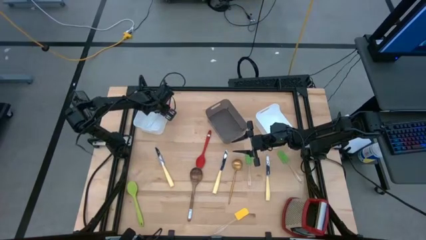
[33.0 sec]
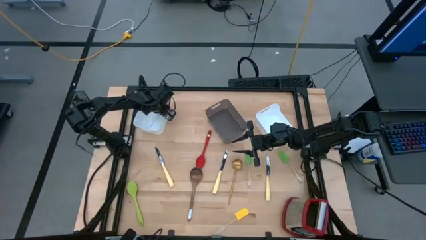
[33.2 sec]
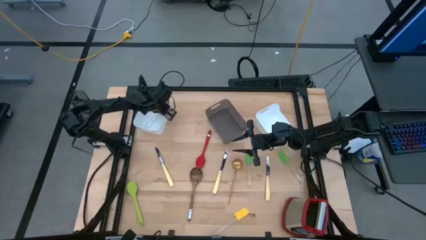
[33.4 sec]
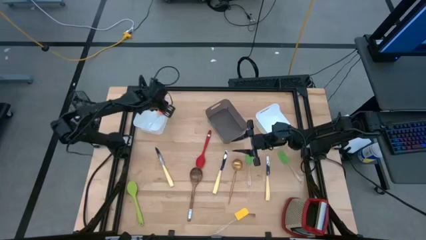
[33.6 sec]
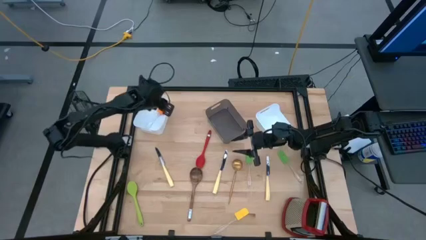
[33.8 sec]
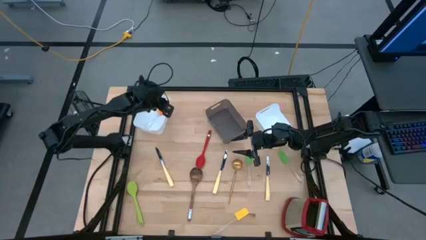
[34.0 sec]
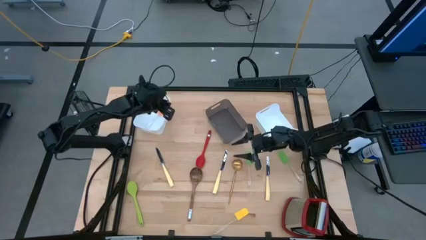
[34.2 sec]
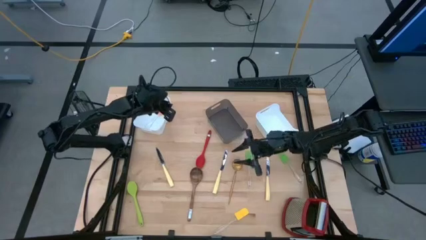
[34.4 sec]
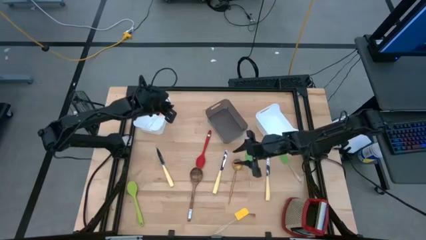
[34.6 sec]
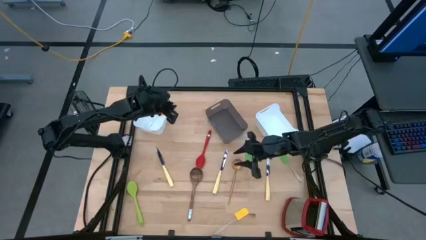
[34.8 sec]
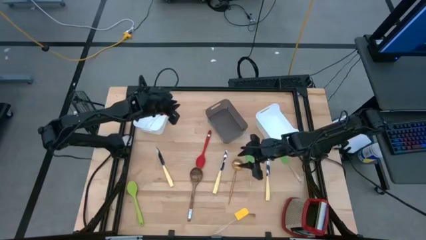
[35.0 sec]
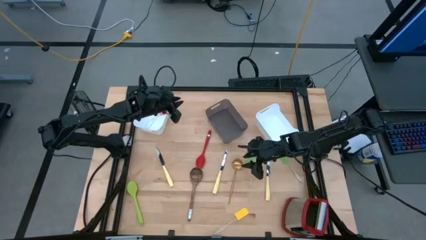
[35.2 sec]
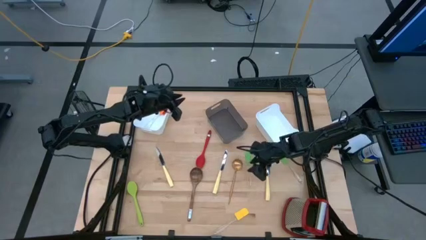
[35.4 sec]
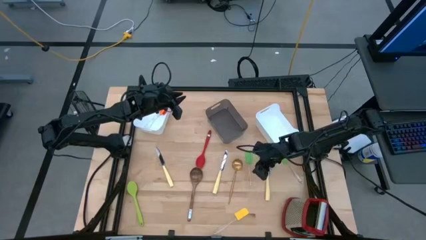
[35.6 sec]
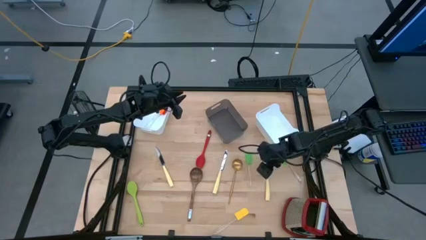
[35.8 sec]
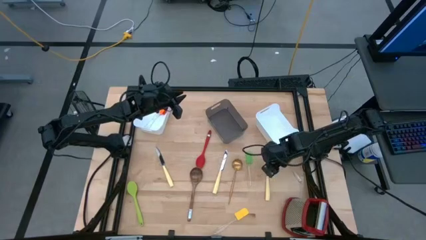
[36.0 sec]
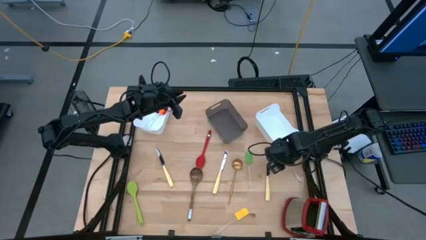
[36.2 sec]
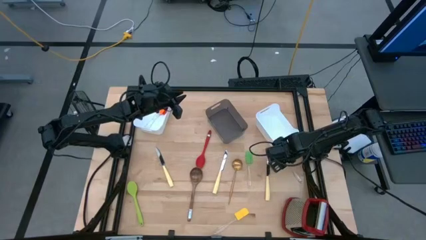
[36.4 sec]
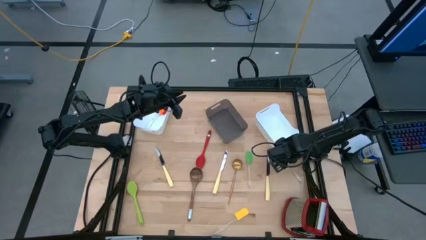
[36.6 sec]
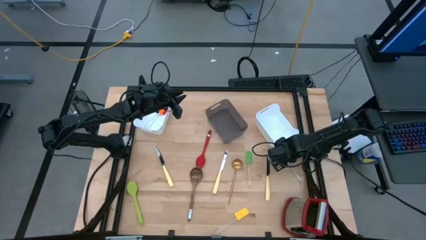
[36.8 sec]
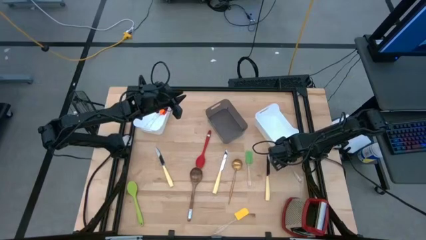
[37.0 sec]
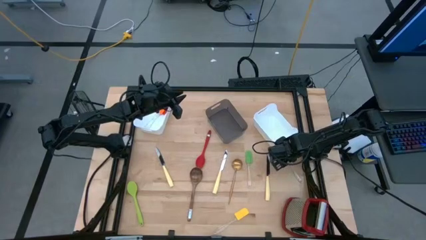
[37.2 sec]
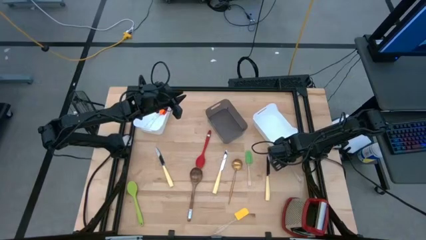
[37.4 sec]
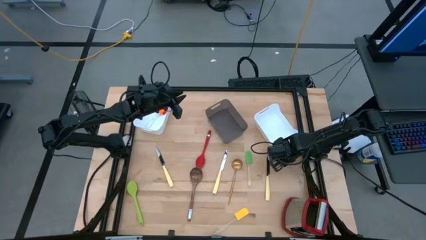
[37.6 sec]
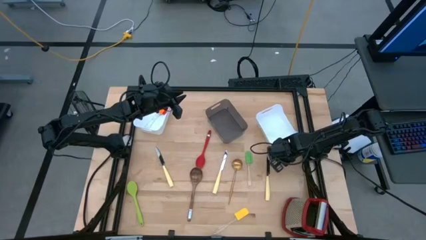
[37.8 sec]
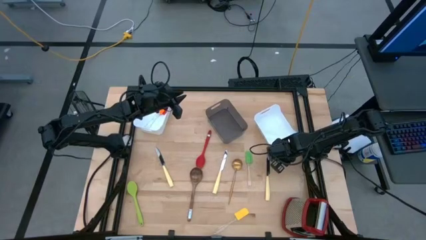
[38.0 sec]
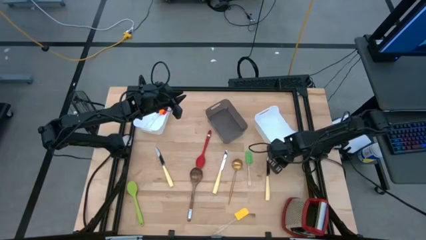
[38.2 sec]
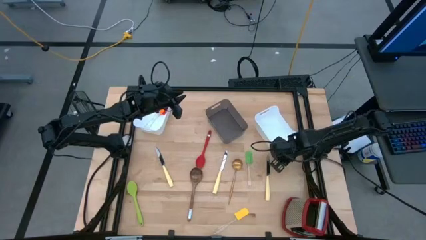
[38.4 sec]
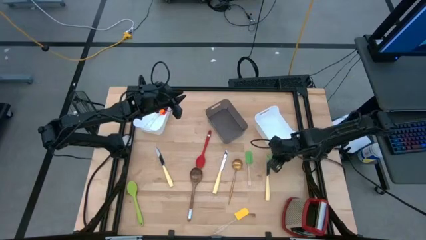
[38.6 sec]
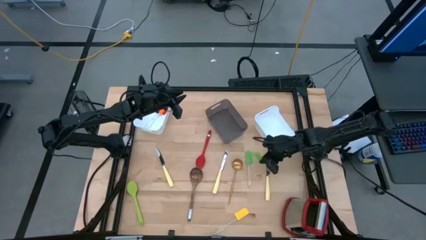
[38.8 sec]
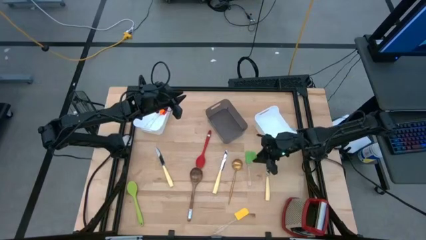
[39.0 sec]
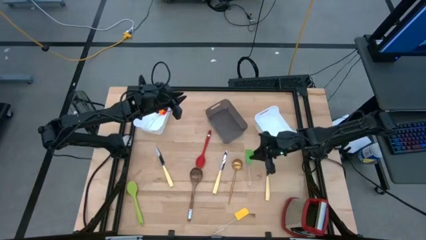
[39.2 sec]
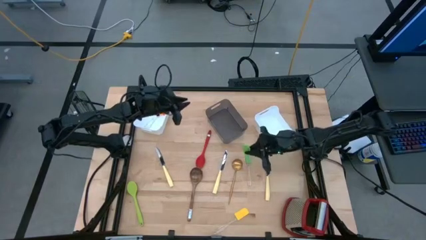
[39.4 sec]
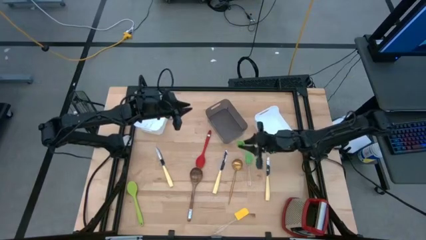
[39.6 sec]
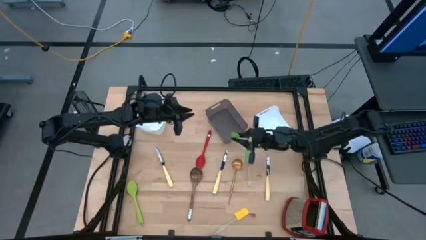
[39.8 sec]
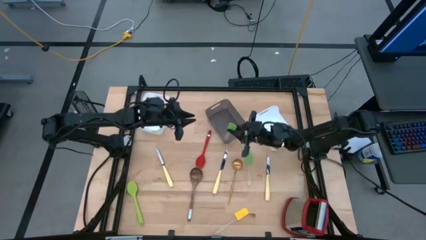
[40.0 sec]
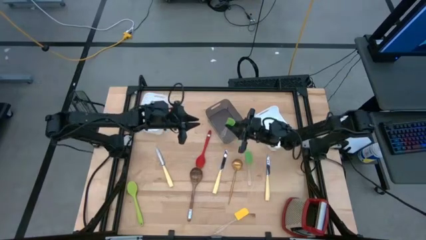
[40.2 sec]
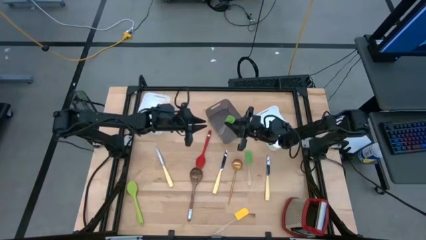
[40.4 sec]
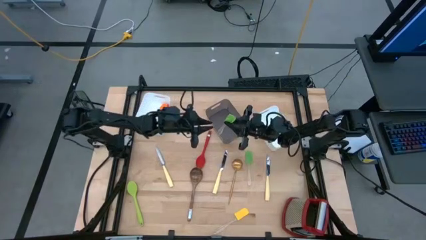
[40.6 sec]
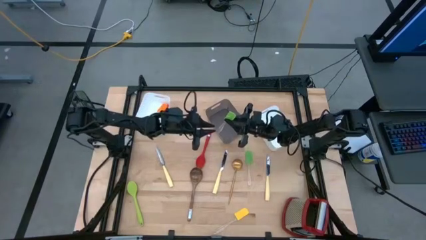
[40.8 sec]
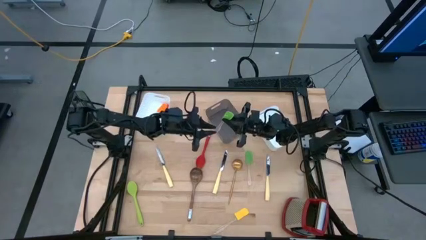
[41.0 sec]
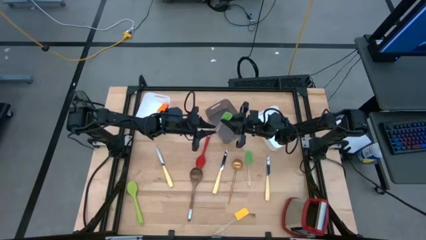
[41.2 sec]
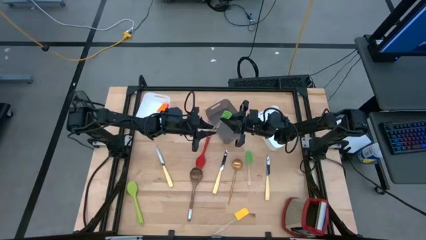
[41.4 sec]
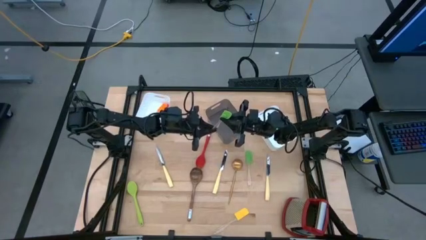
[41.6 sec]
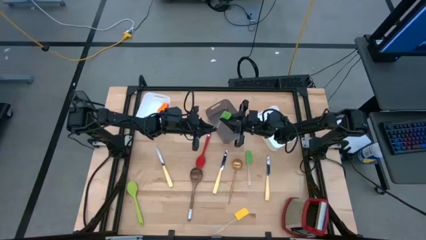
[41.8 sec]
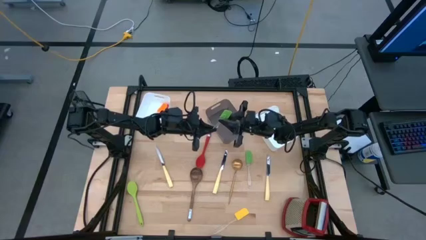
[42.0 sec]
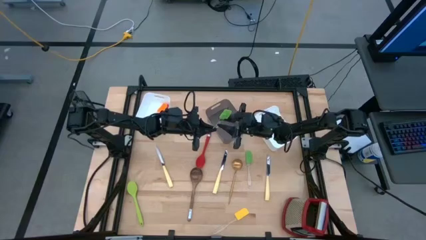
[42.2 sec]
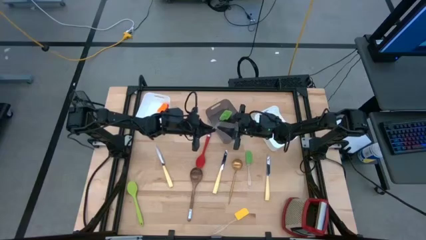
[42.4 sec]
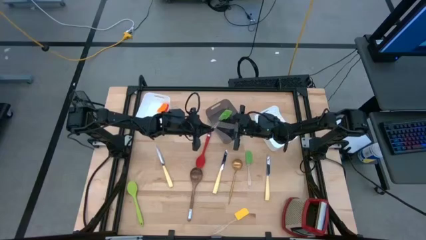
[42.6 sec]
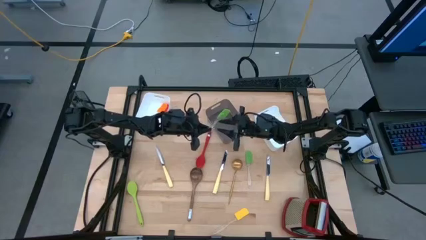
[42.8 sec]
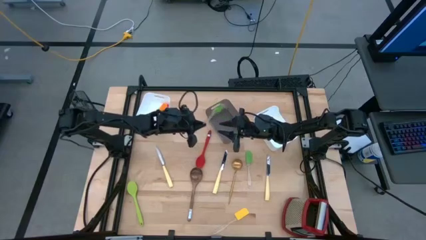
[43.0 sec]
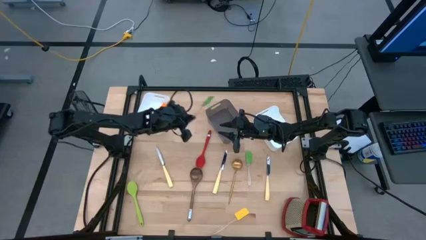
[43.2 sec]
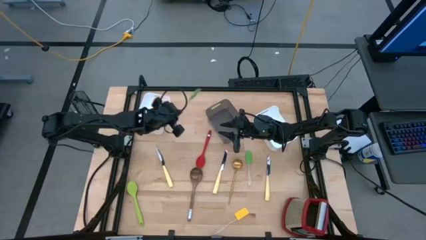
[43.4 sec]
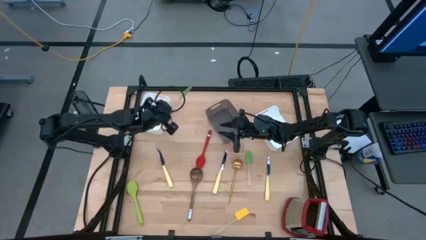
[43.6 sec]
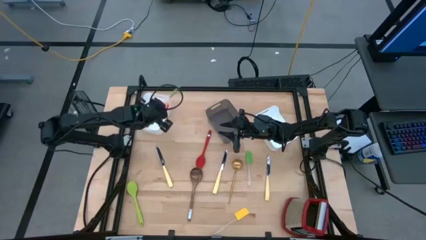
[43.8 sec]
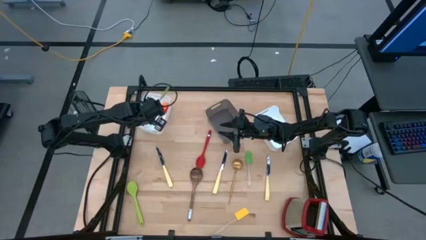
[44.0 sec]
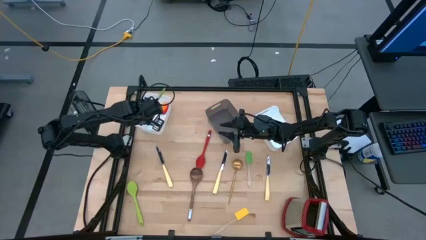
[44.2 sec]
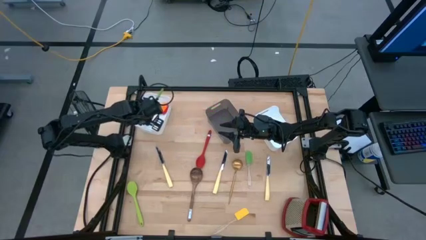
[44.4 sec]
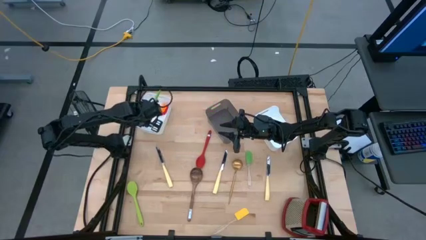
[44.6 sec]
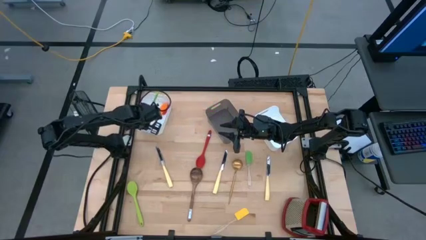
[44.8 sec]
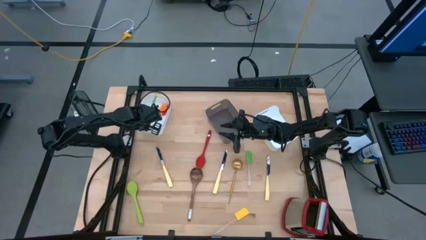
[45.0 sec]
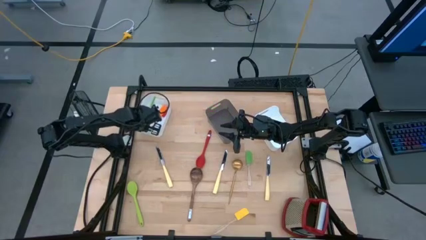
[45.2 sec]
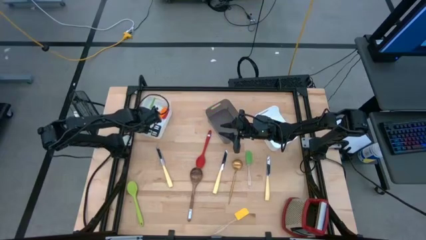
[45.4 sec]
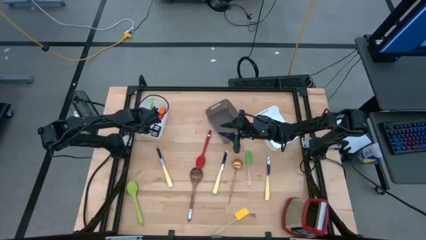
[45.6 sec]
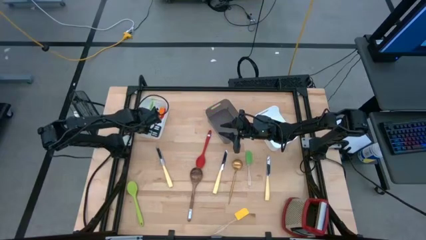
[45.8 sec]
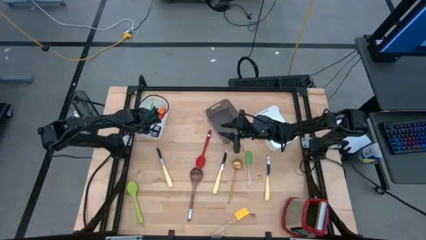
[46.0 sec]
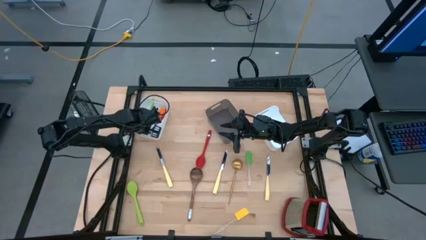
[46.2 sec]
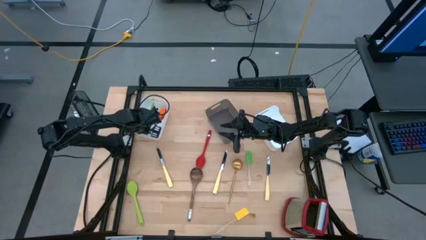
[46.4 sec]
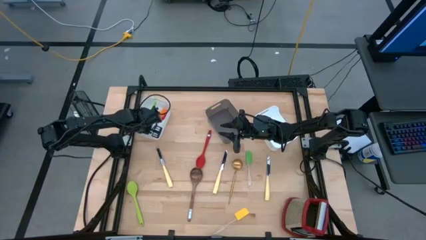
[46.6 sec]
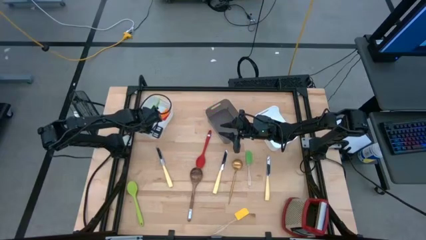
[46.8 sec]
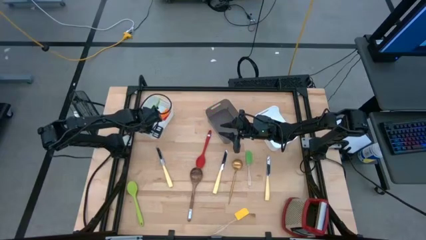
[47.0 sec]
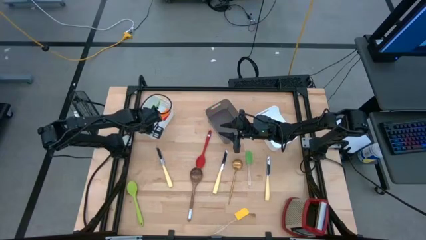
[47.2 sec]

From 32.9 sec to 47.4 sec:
Task: Pick & Place Kitchen Items
Put the right green spatula into the left white bin
